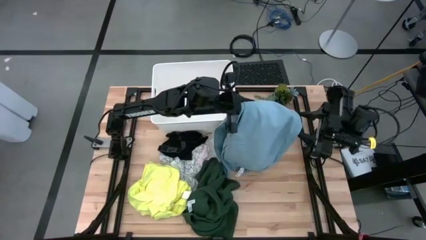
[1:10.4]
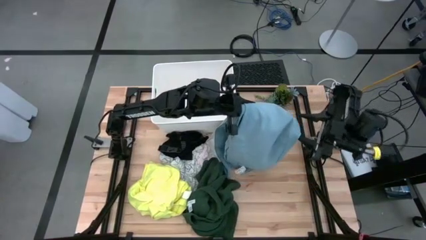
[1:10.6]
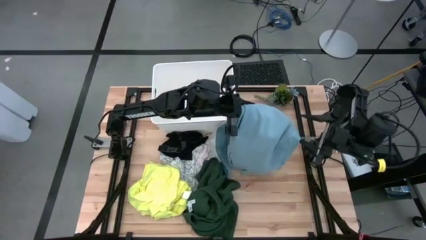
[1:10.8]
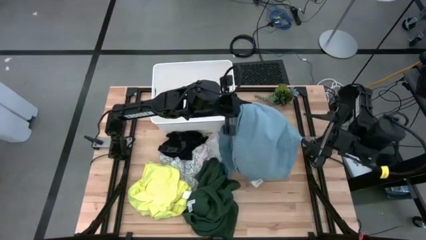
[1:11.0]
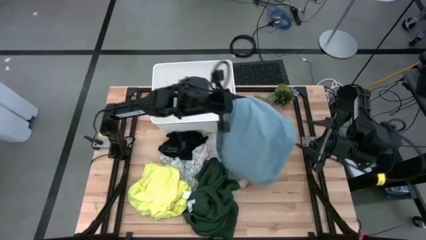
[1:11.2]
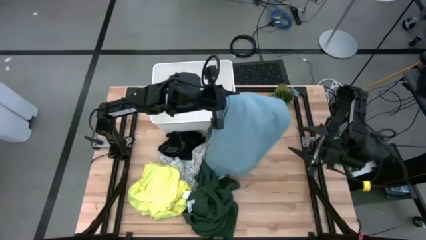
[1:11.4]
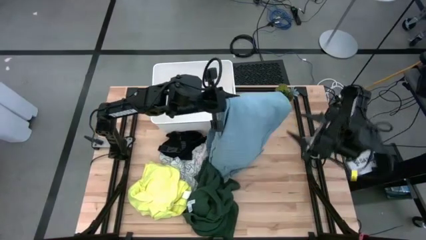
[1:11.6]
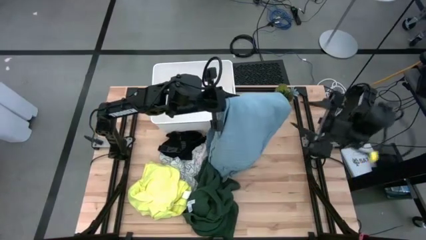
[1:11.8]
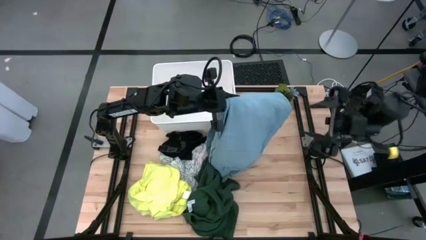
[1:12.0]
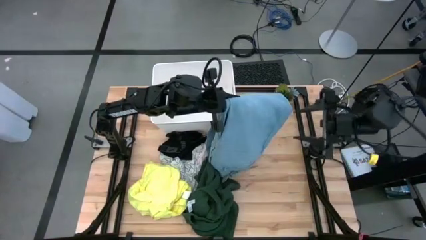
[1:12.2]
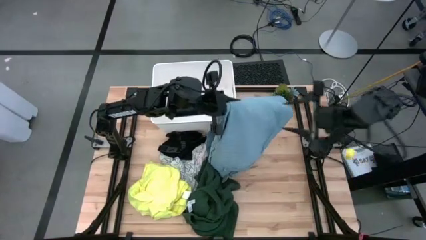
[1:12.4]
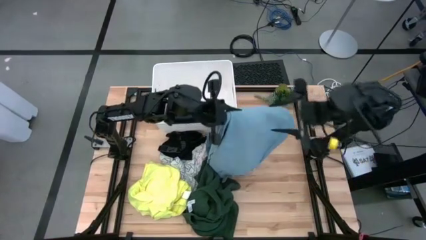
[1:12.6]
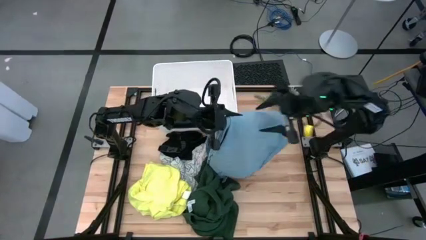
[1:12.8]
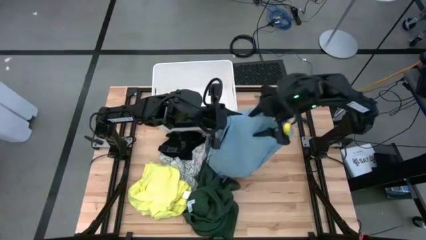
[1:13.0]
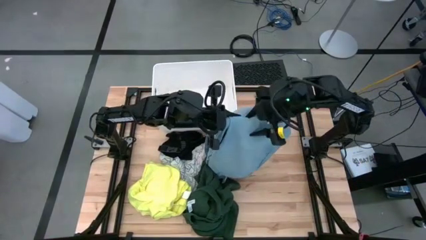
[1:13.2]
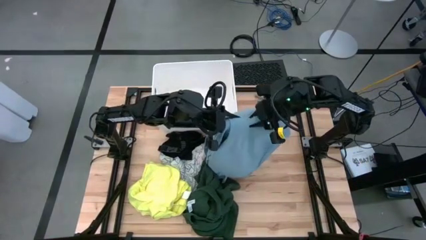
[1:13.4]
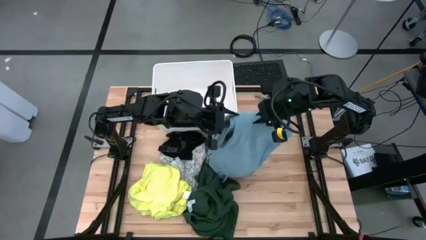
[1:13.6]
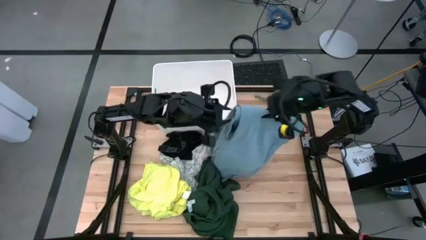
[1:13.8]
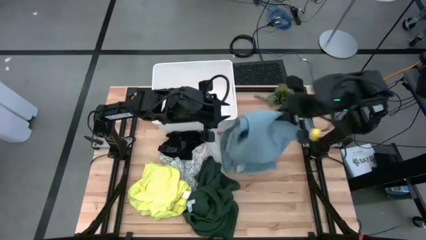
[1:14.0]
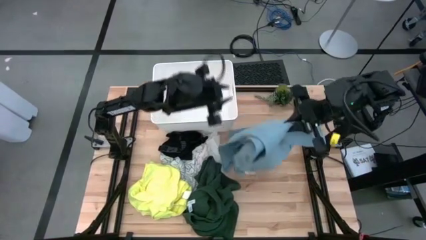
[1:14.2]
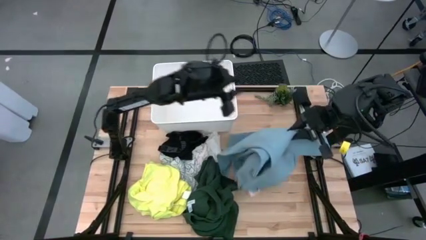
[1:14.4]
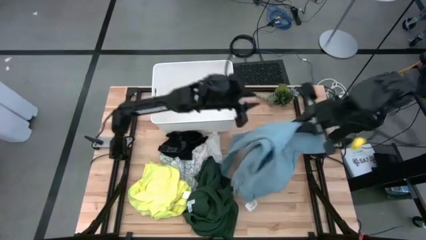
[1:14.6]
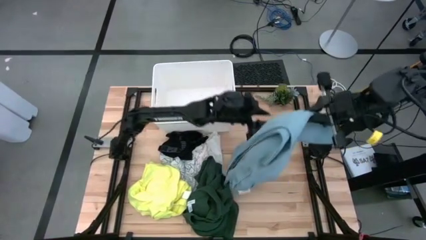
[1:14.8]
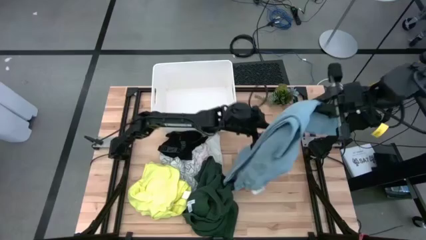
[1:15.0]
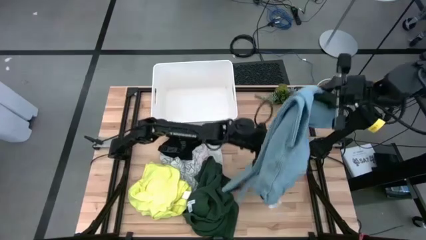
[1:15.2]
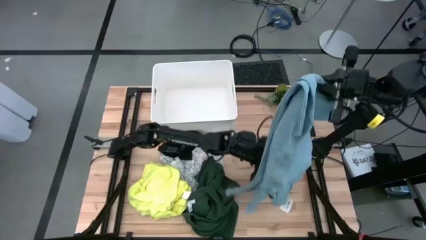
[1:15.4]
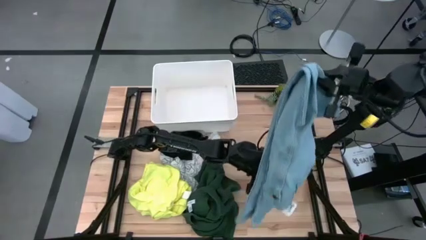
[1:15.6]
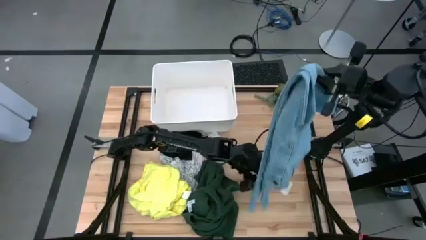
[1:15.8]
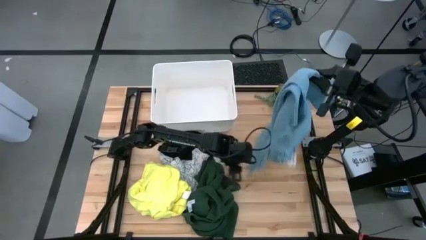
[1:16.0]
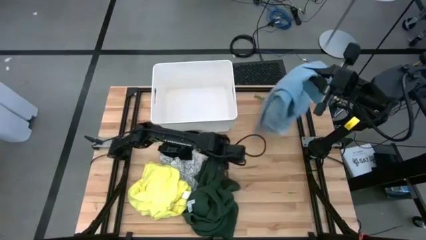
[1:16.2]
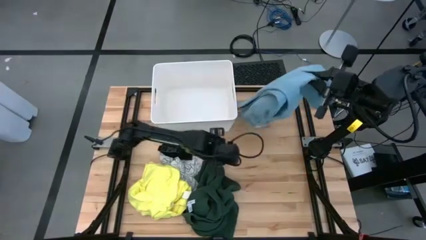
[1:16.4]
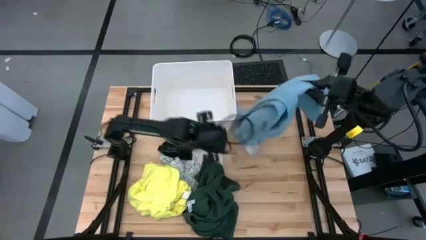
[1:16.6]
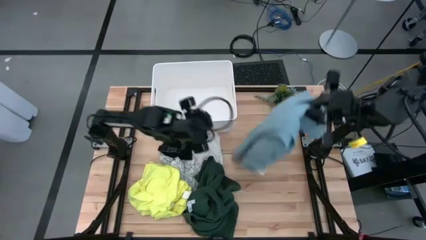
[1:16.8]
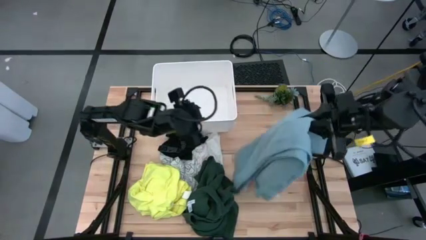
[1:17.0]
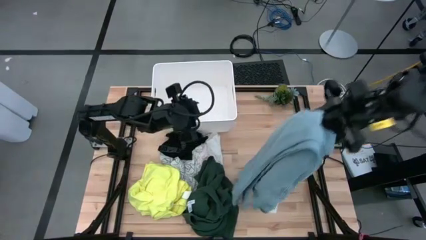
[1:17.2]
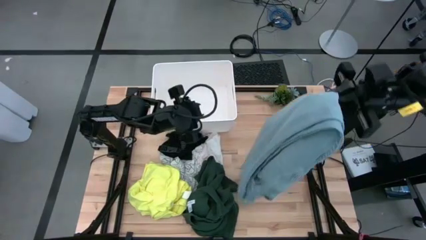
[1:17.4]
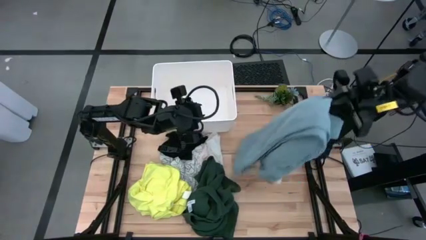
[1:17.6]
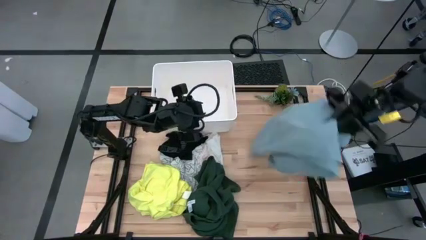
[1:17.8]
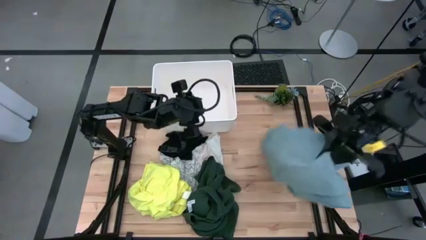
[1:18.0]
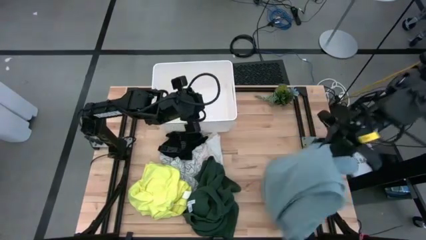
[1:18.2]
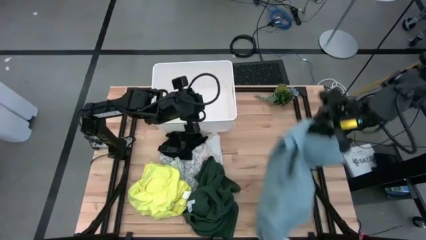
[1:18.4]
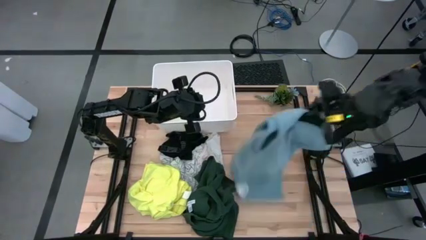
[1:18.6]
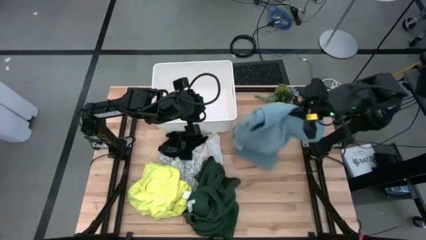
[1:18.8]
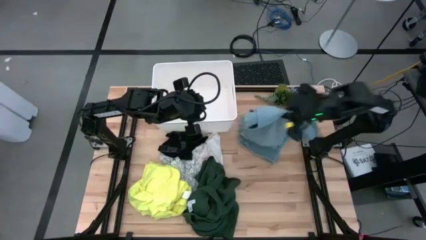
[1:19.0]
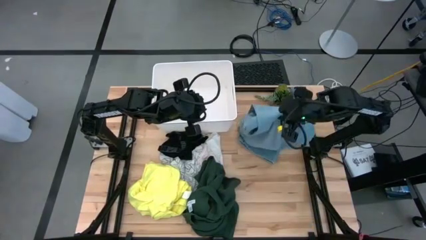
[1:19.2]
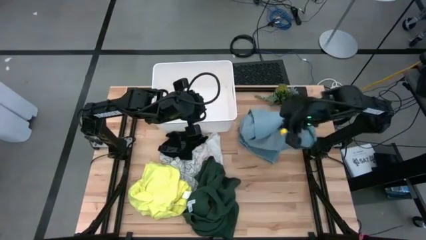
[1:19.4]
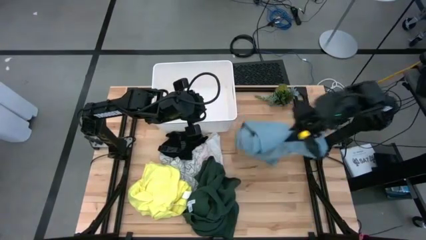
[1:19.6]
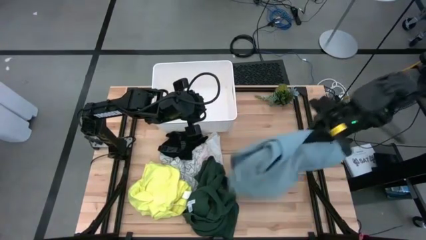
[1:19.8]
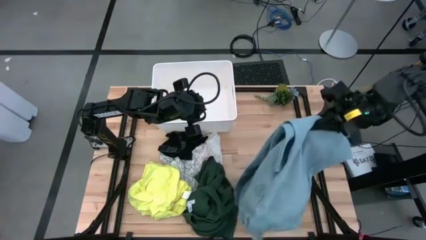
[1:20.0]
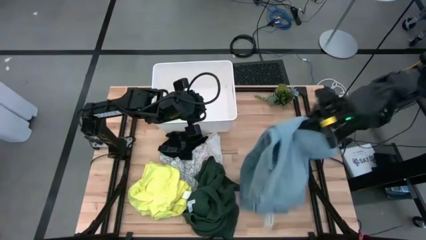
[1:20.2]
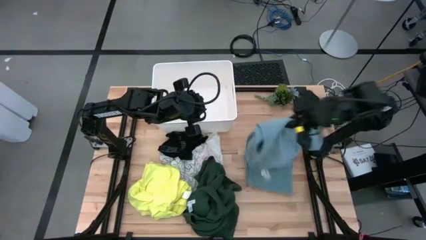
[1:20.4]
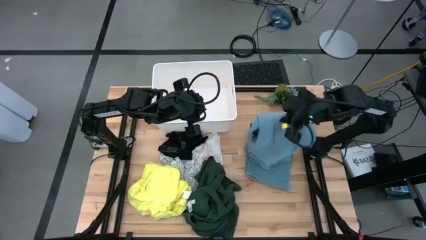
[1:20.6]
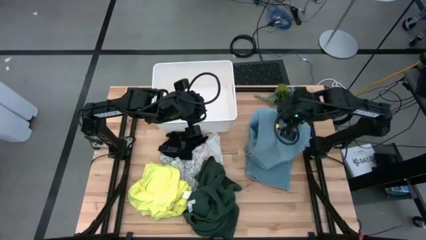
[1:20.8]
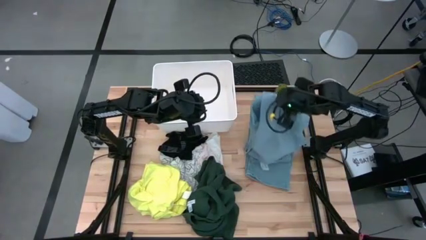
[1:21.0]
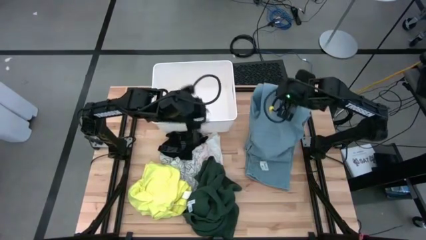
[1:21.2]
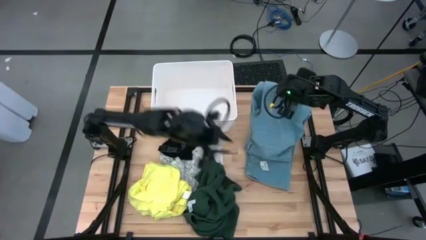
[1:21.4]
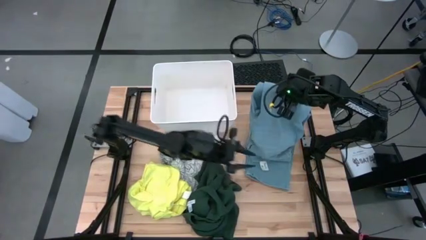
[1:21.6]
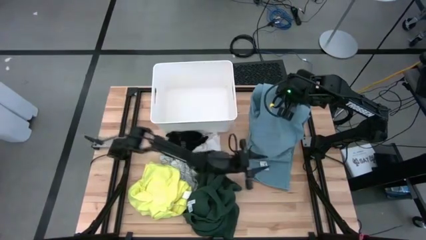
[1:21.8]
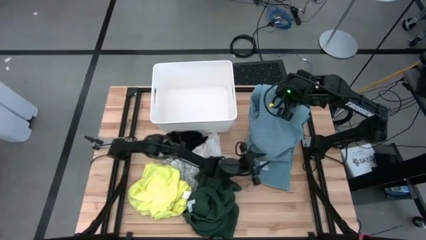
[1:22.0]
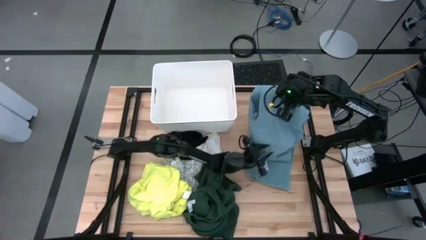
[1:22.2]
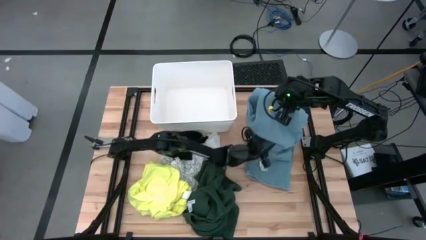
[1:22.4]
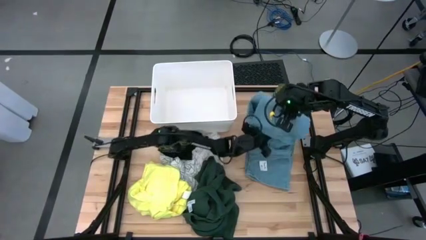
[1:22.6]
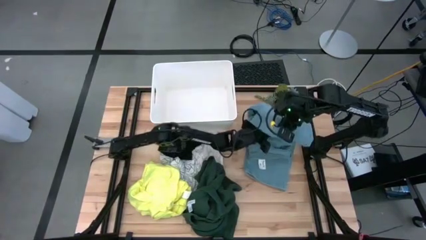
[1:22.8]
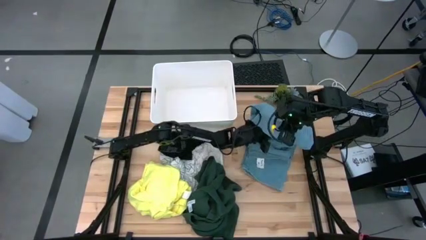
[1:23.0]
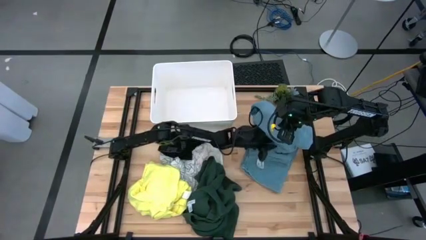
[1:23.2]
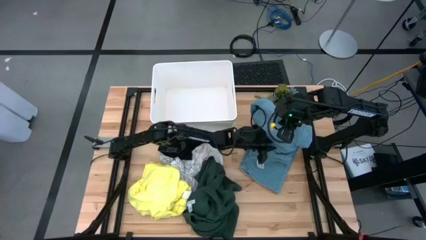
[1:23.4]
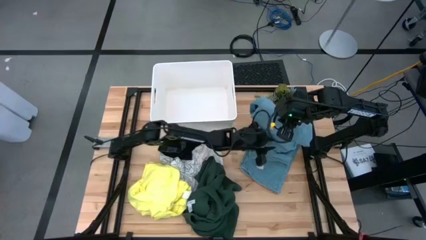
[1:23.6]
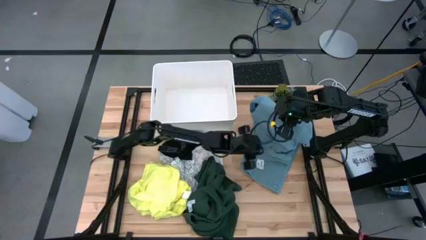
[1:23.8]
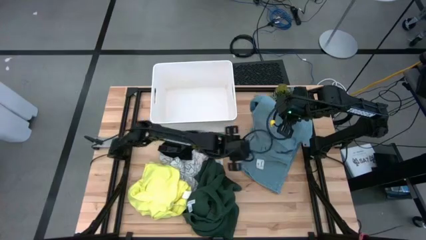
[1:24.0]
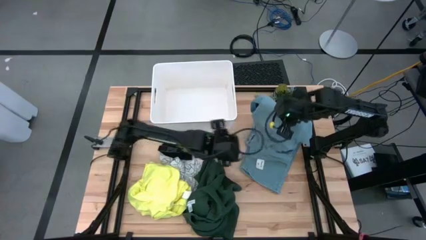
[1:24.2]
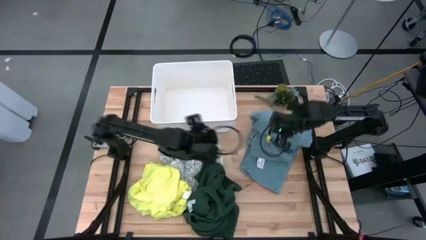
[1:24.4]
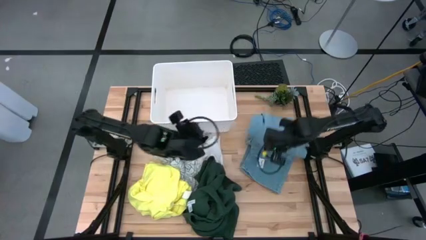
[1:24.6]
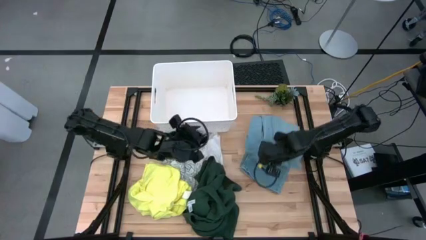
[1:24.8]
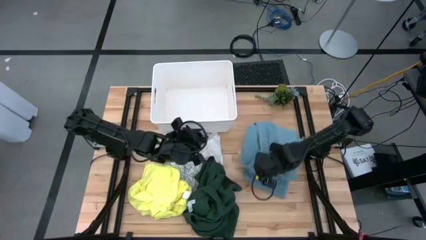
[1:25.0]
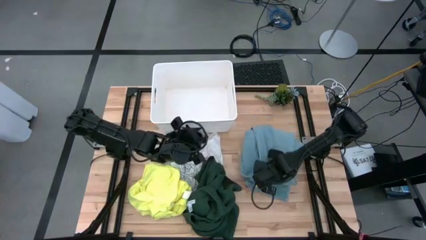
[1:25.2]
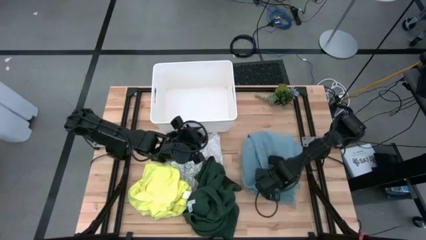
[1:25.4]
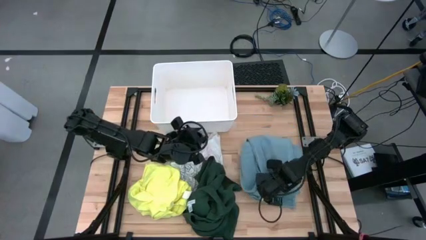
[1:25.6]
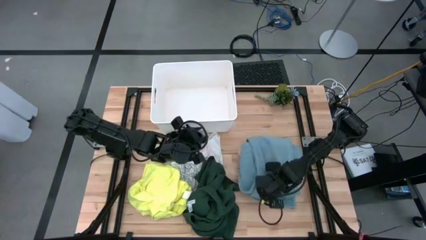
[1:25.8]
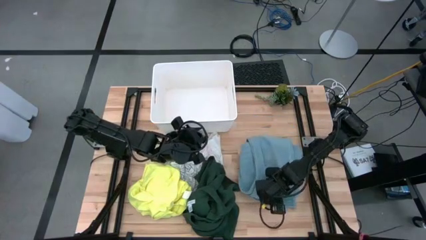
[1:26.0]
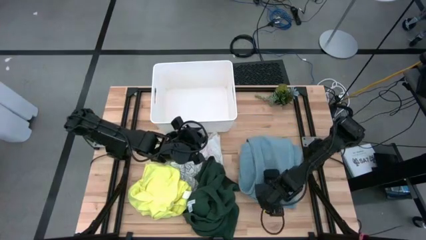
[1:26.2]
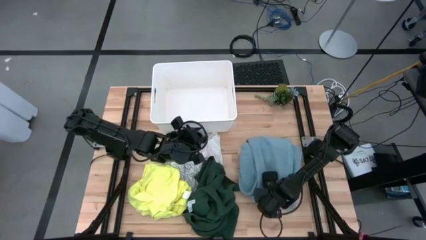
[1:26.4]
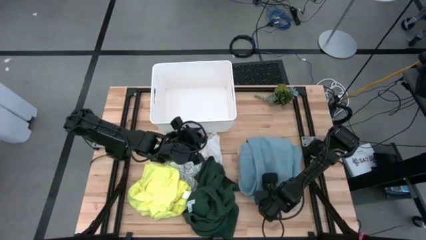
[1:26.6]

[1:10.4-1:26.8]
Task: Fold laundry
Fold the denim pants
